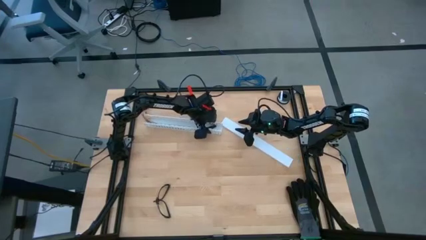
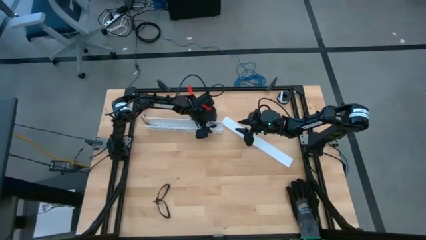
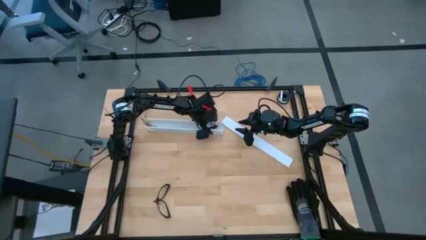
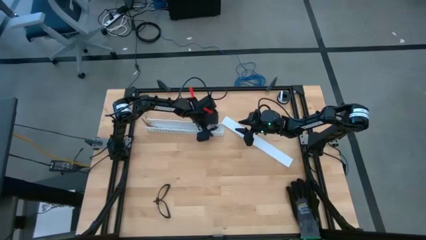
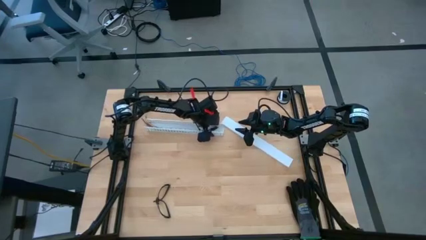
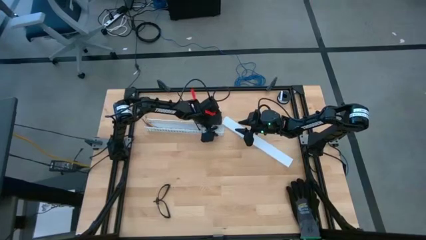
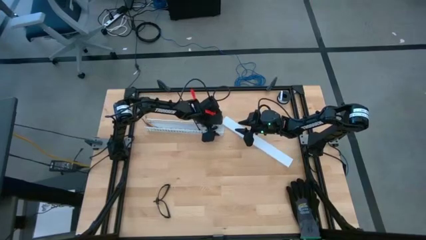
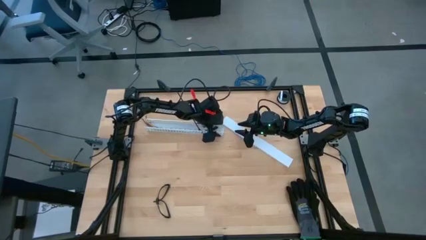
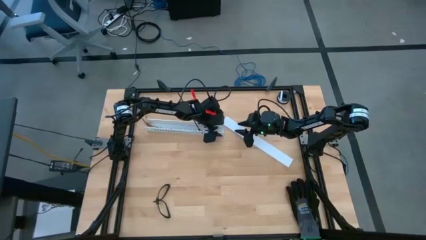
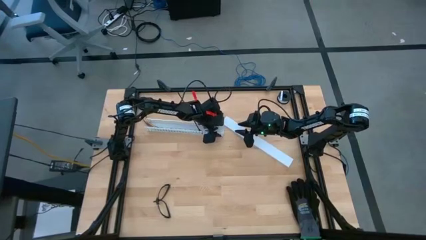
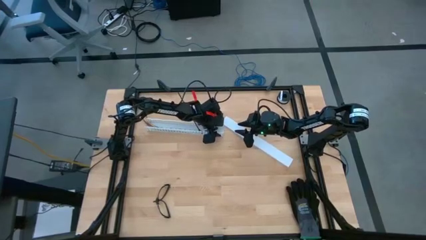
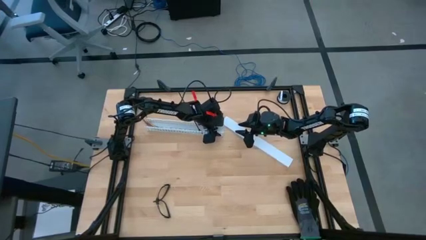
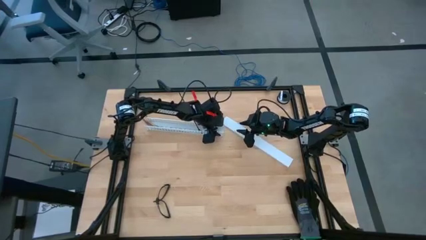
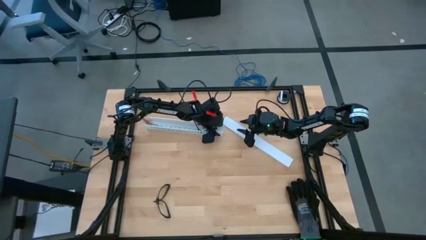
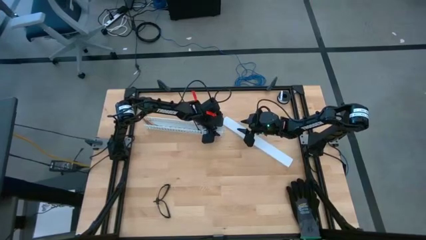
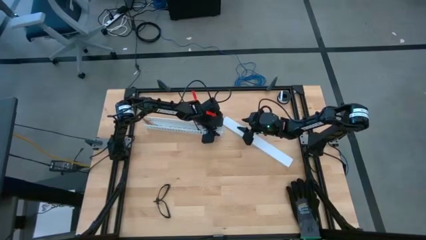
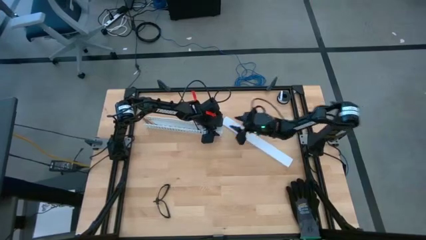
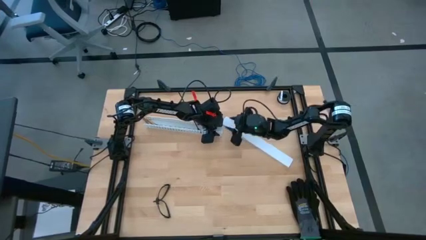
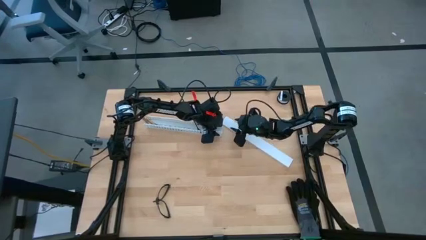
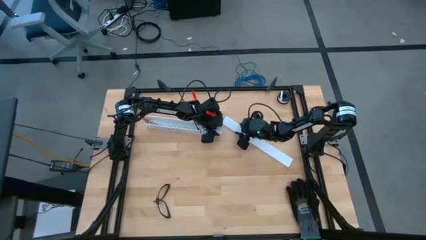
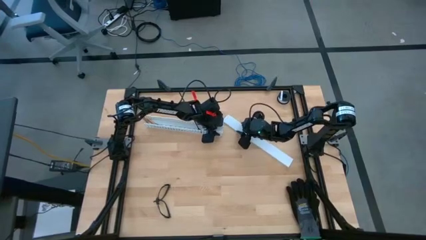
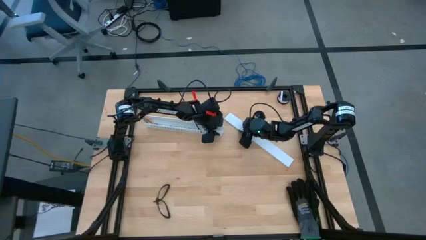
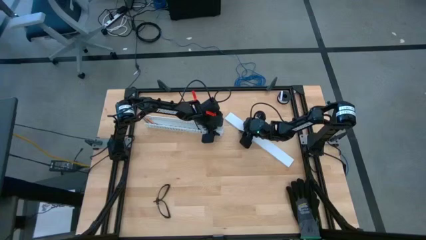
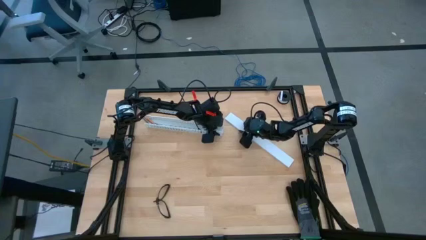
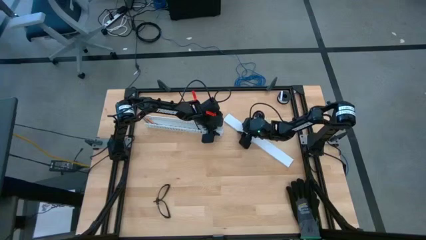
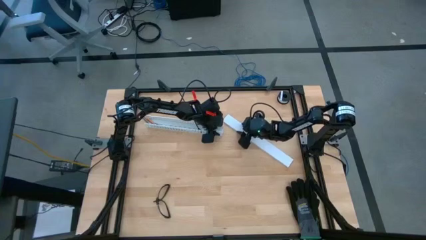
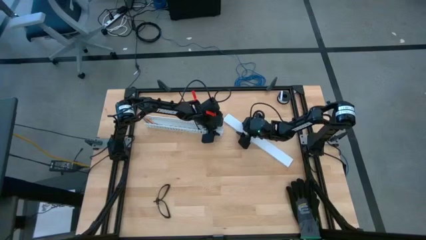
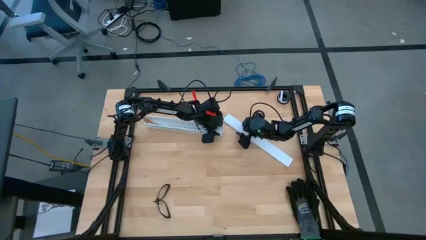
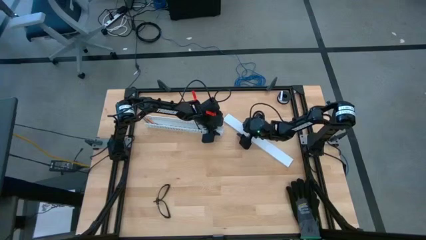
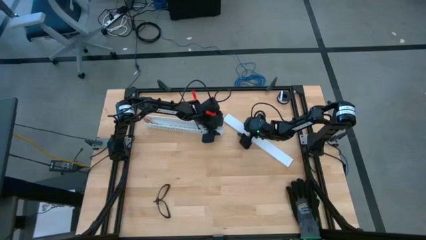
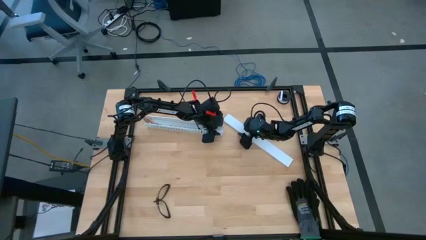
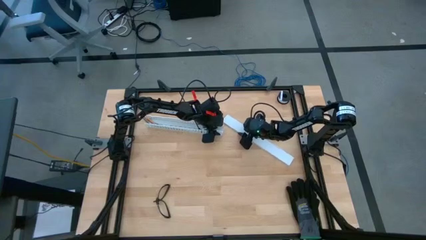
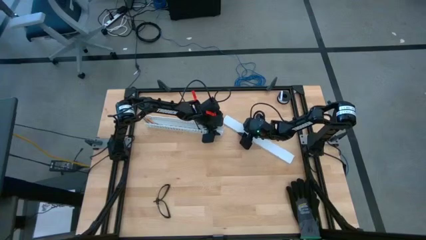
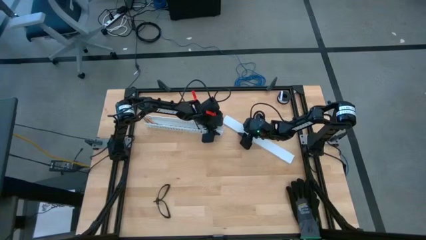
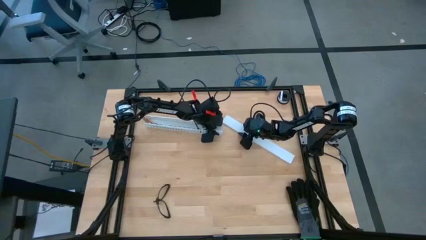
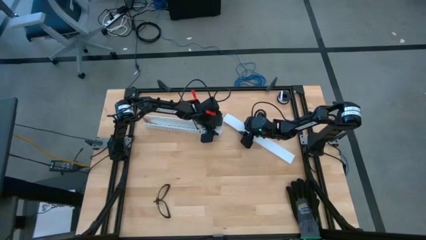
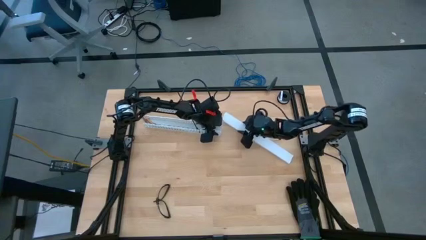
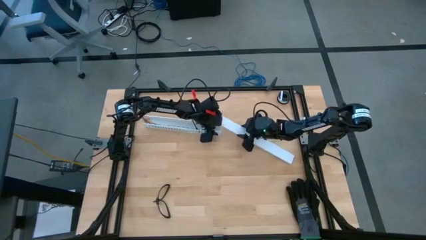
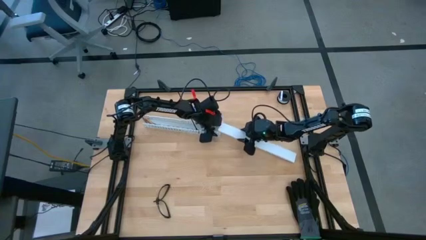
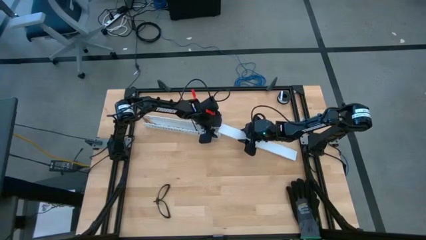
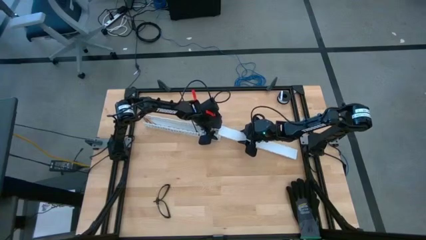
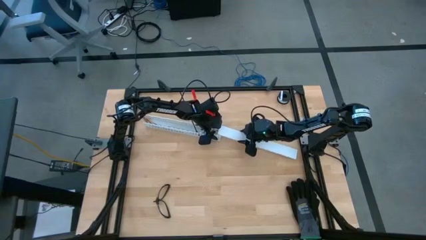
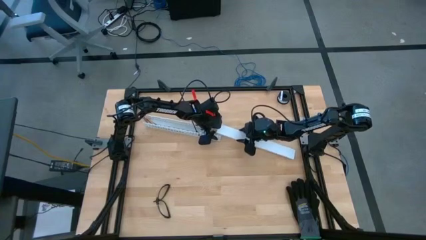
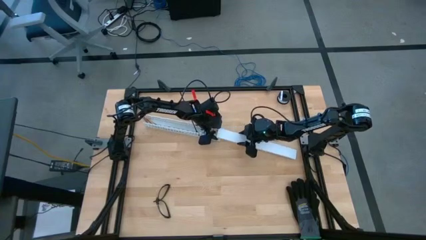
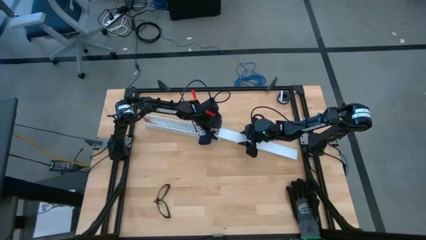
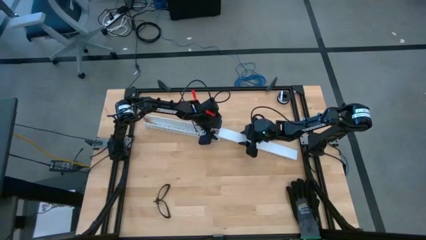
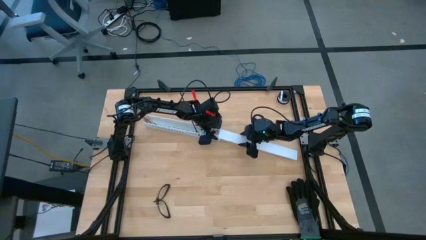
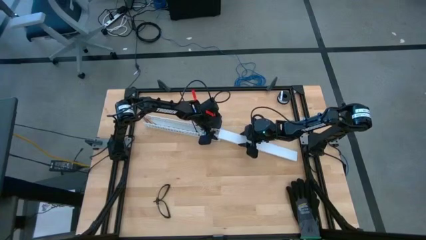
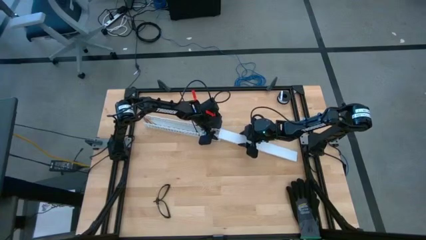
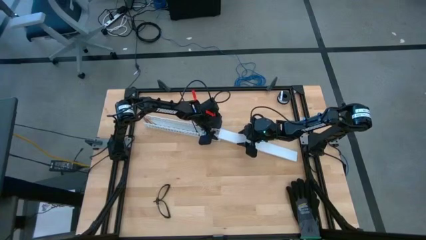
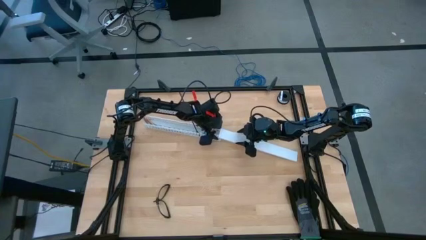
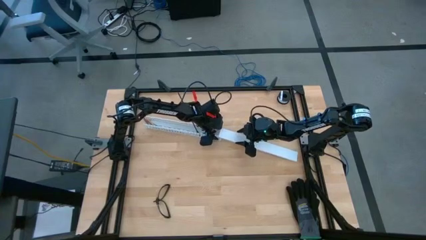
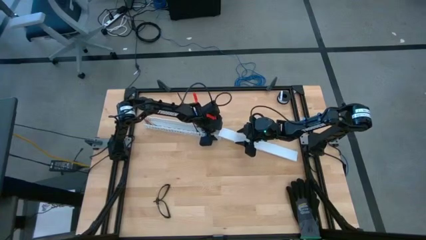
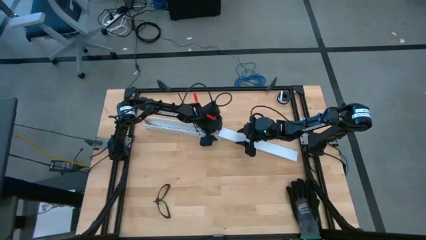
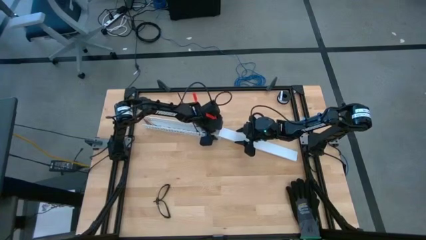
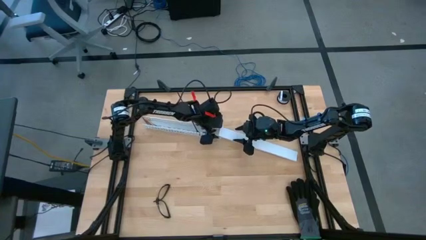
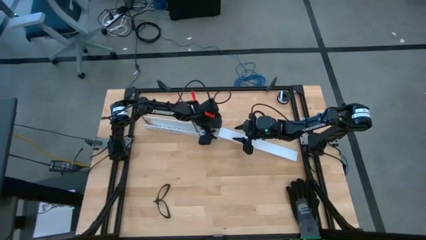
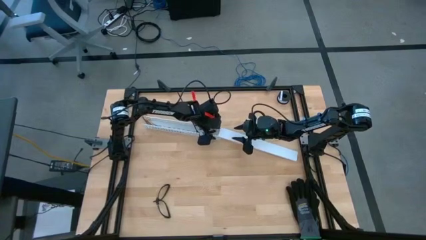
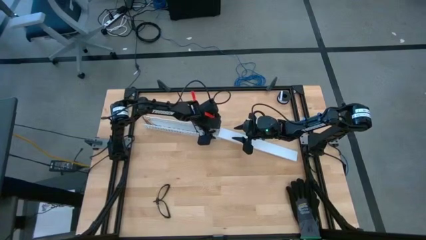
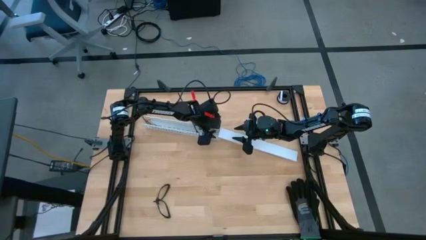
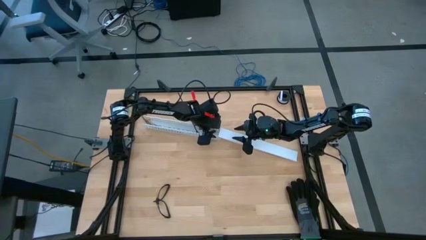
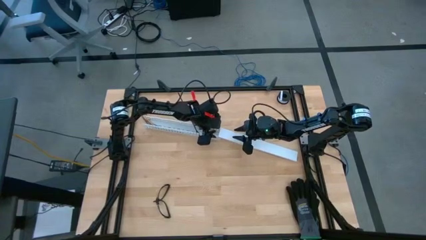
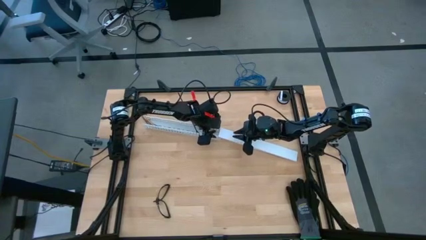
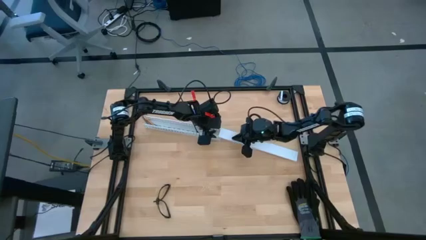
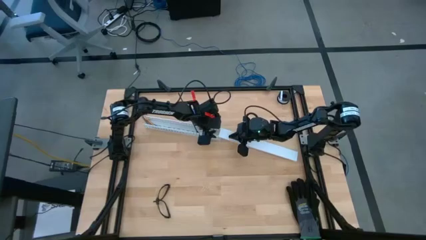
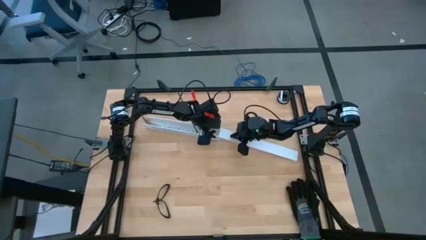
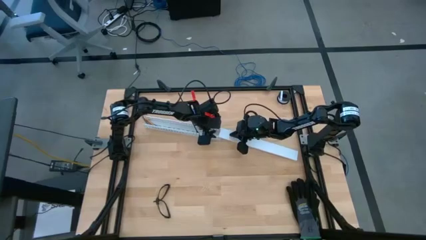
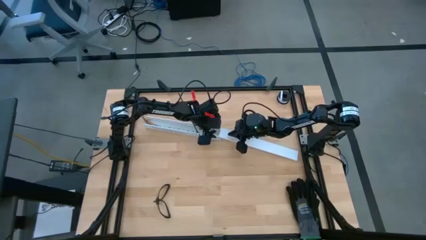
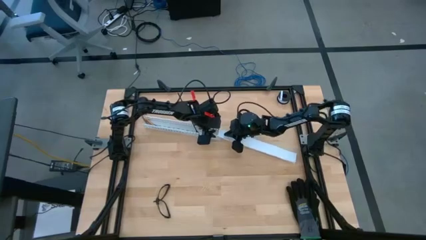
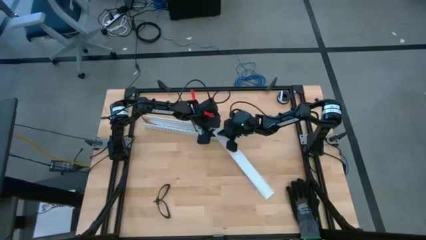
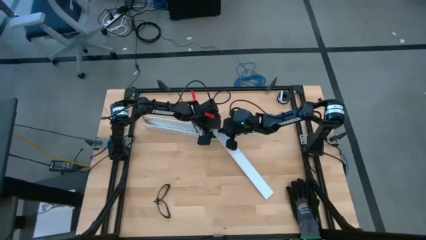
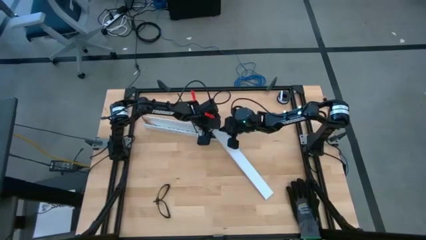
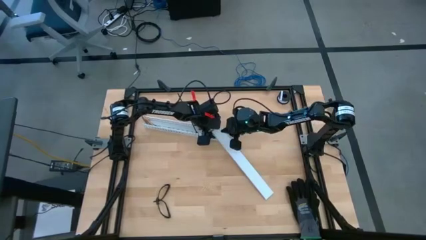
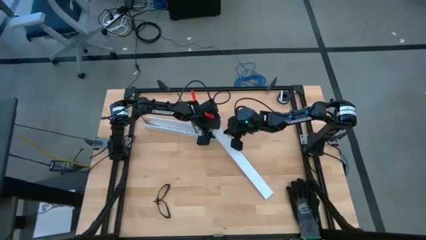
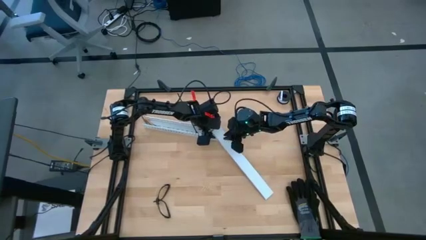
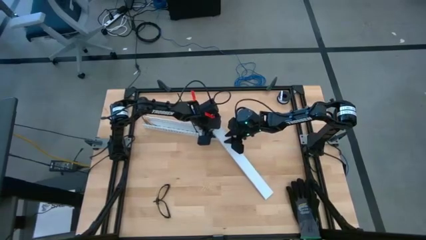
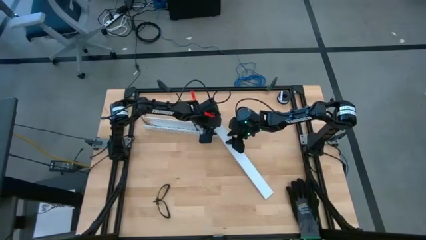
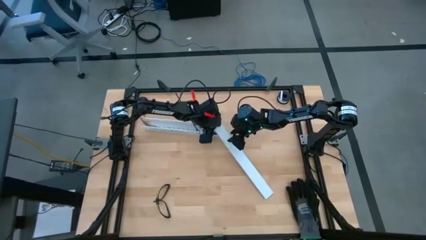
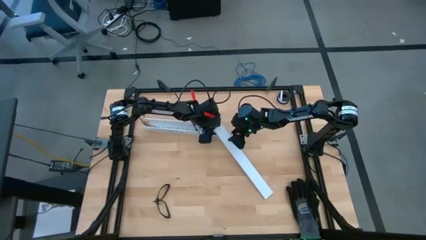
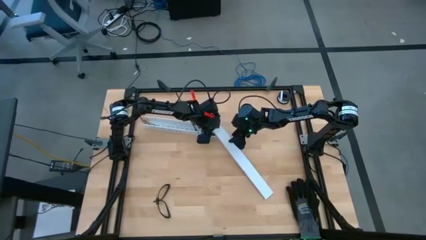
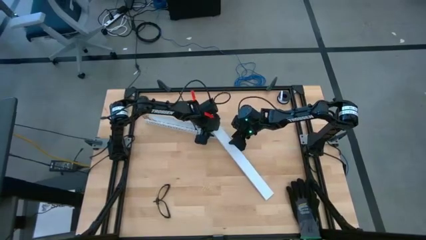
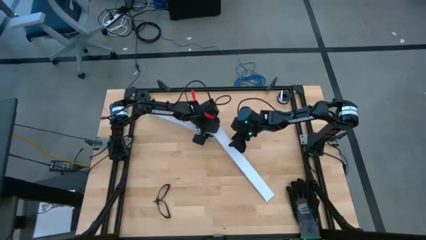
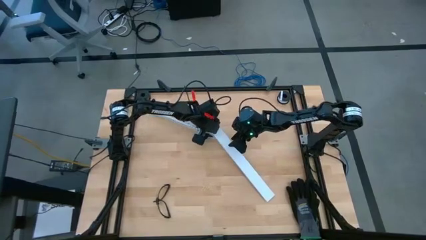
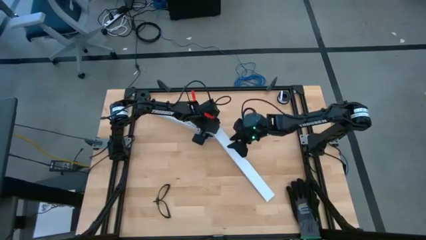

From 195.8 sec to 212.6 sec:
Task: Ziptie cables
Close the white cable duct lid
